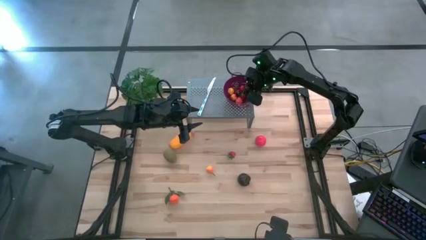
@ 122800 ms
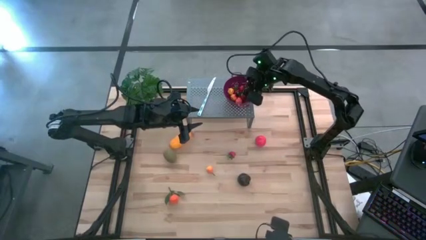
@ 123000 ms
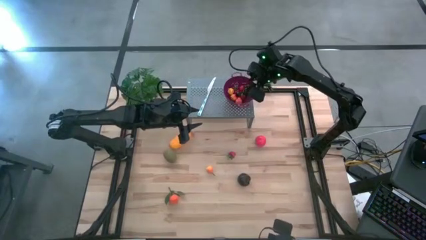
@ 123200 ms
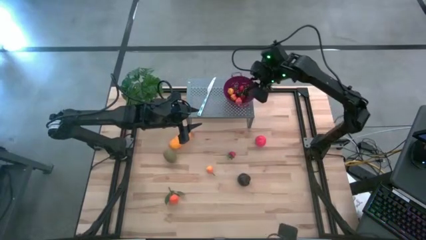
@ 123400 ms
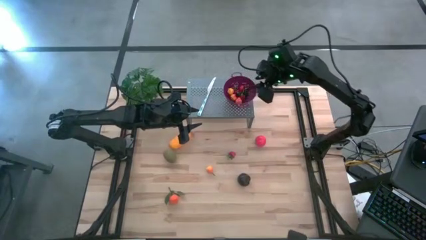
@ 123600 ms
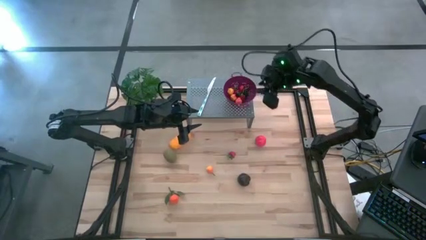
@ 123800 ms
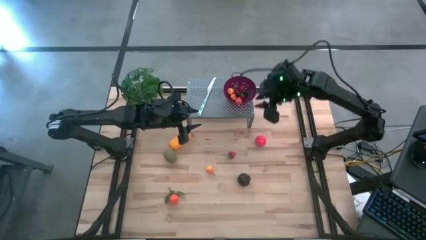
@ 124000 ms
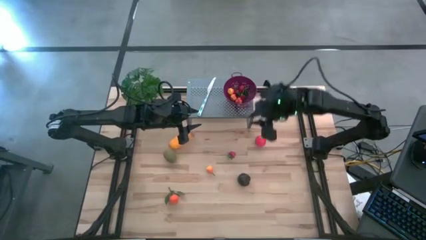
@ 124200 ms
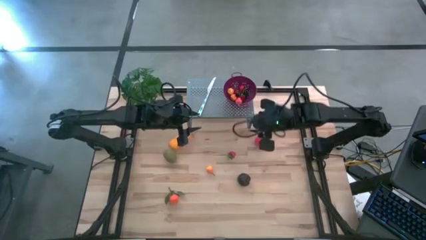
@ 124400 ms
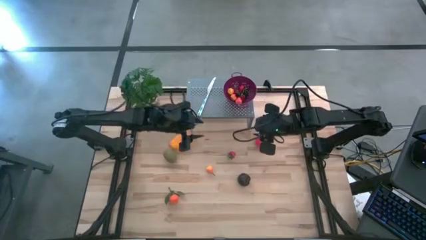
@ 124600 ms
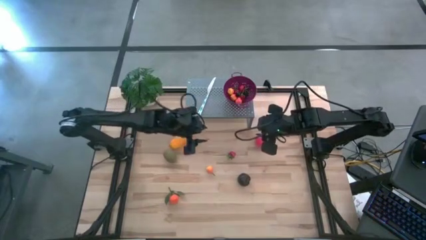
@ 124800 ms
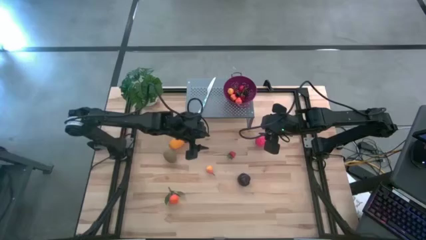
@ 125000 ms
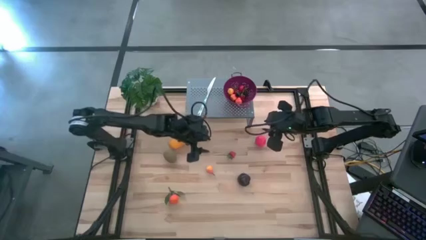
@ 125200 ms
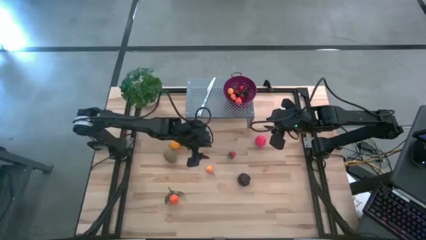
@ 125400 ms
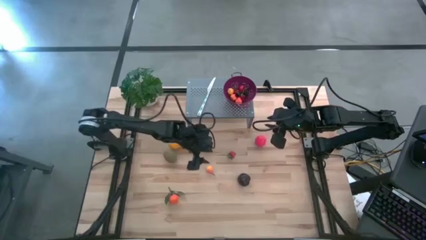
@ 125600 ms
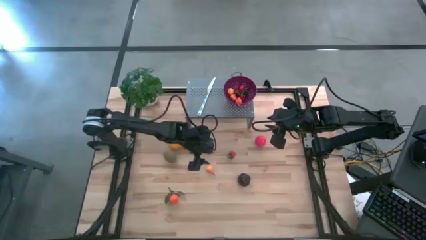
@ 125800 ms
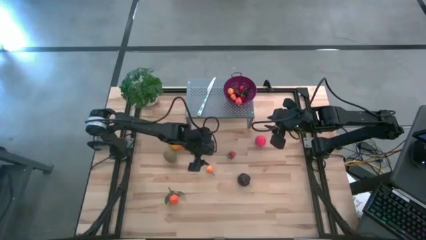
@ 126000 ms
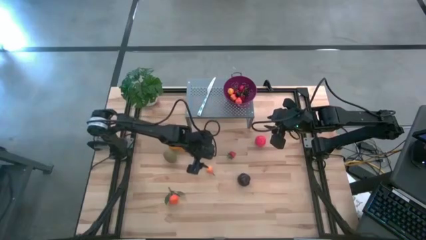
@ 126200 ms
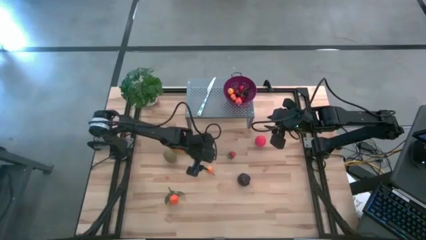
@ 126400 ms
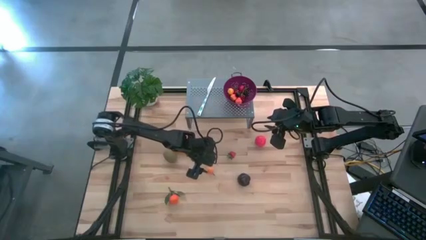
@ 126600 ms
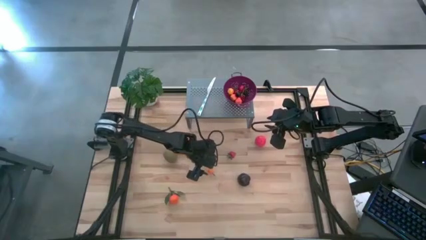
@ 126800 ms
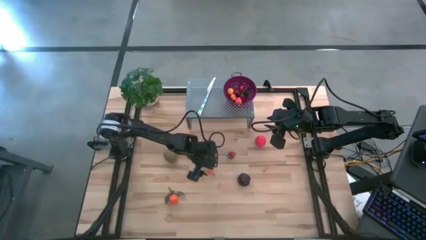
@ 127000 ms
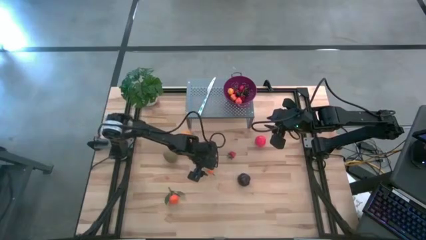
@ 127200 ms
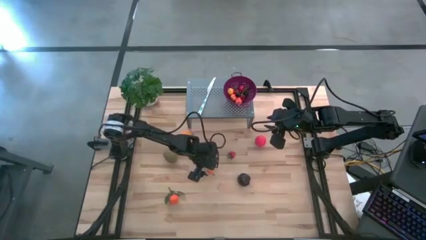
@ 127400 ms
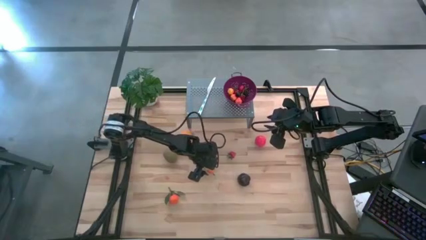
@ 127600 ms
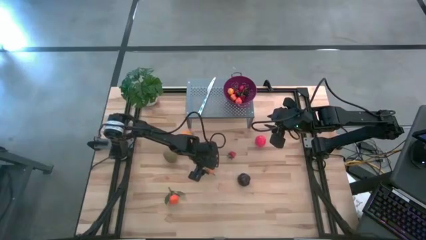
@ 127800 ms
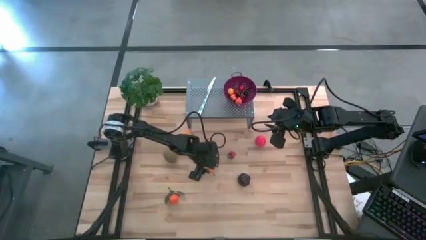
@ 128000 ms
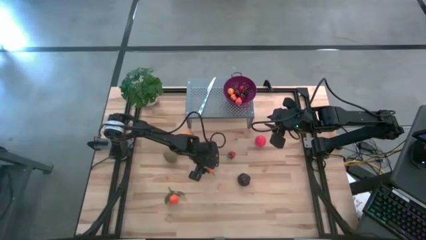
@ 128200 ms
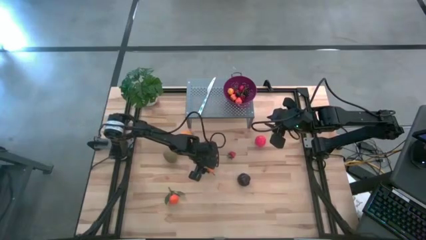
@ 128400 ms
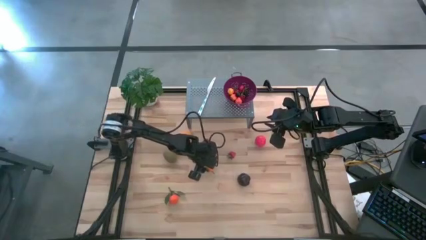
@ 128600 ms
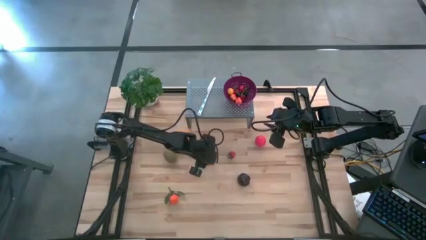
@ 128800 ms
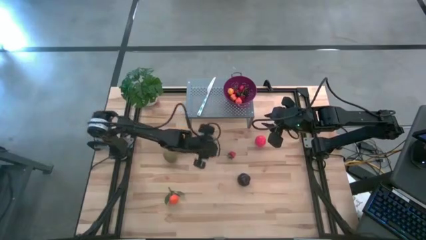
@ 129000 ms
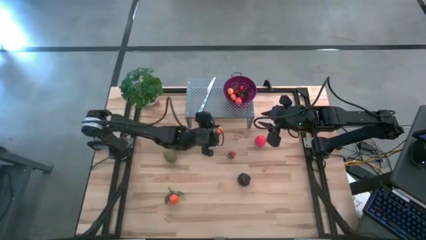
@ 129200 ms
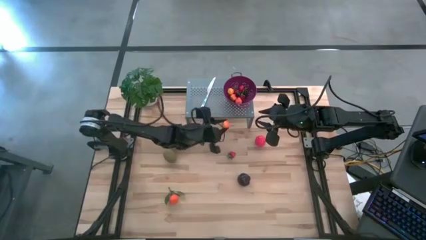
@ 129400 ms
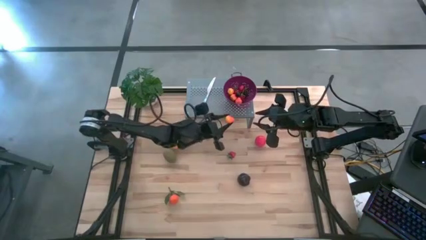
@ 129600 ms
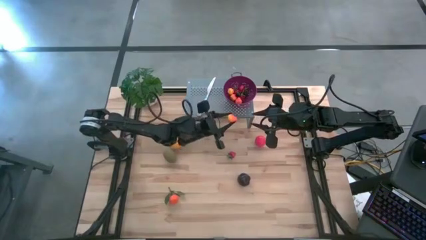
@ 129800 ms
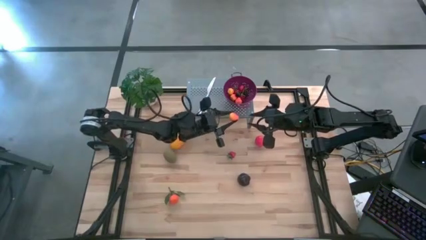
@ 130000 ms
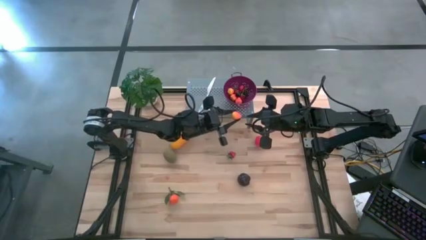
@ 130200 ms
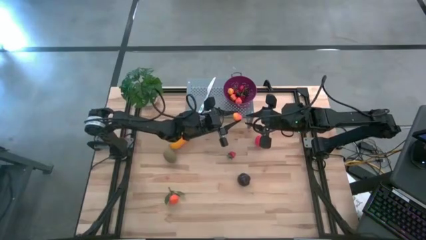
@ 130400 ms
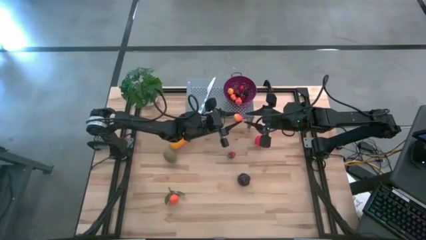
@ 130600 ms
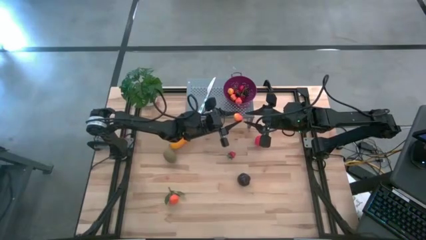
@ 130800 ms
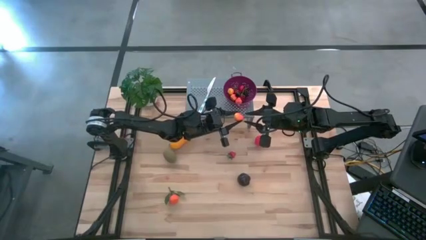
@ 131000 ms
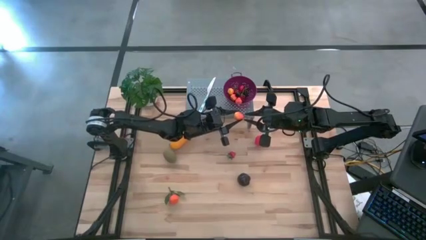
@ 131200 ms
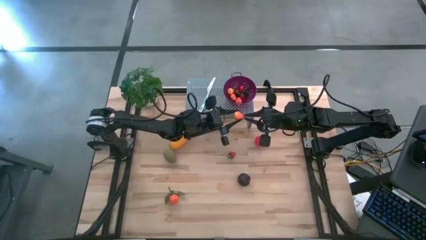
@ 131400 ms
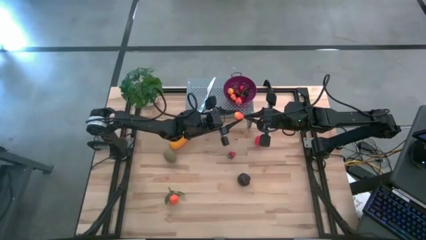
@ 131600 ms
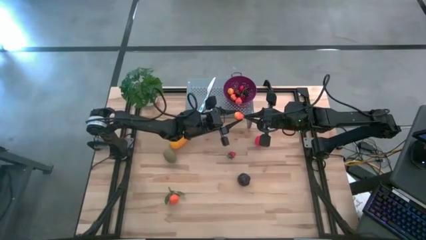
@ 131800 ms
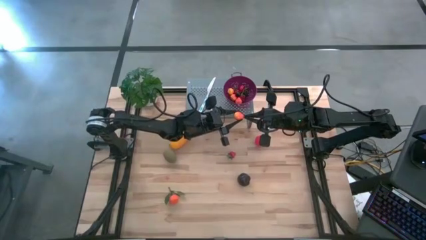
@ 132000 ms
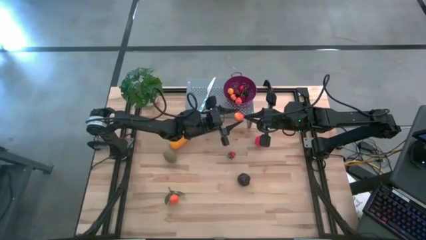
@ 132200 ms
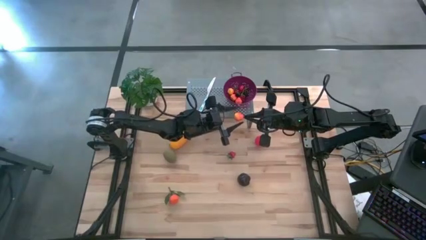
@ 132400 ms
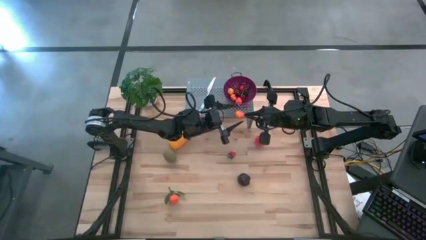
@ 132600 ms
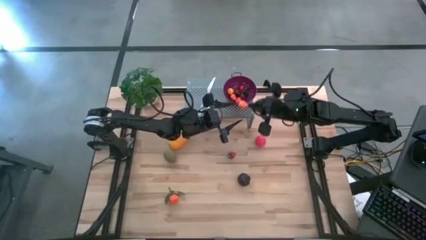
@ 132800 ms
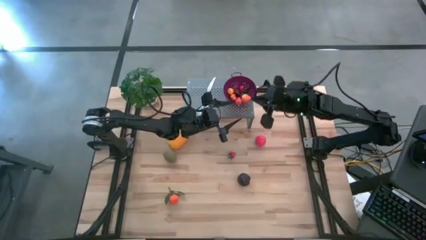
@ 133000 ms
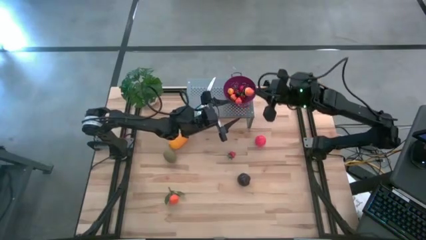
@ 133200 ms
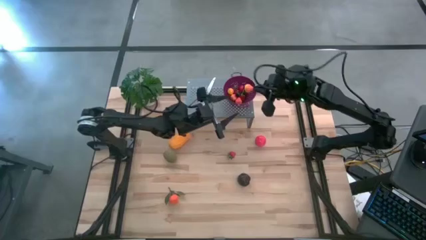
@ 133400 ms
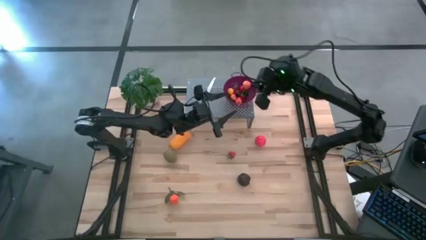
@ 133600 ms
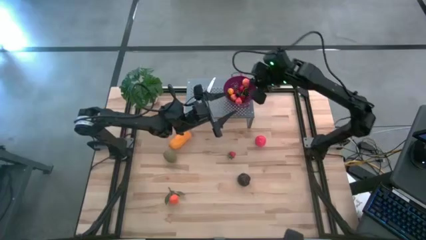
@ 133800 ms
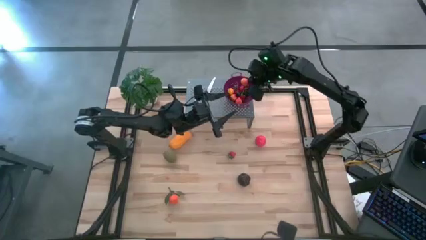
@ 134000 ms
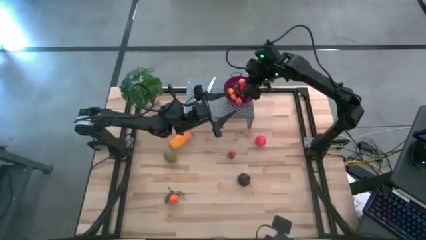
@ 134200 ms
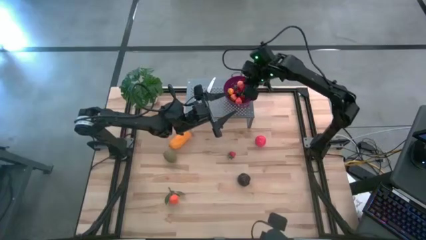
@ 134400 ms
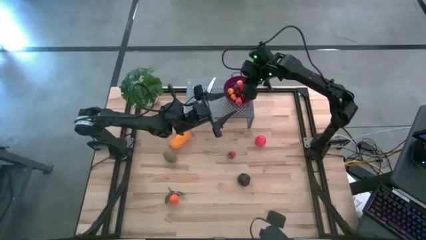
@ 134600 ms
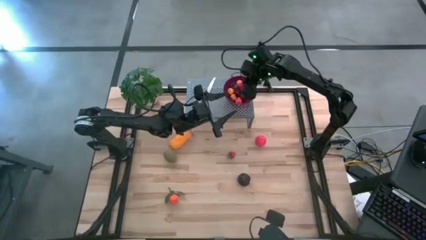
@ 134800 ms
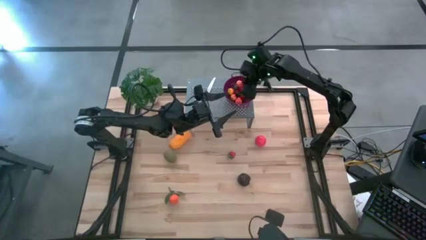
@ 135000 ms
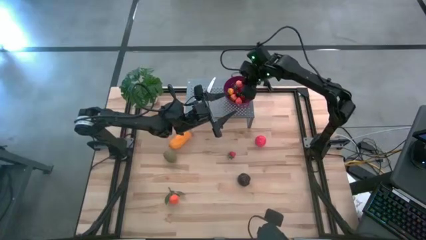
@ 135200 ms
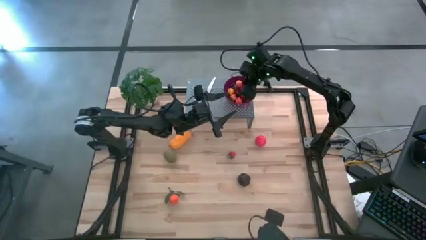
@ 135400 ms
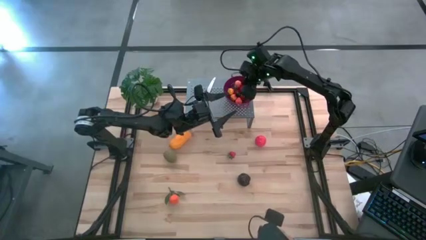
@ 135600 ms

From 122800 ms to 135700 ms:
Task: Pick & Place Fruit
Put the orange pear into the violet strainer bowl on the shelf
